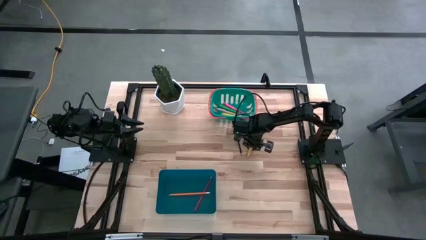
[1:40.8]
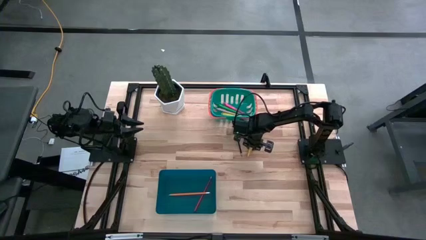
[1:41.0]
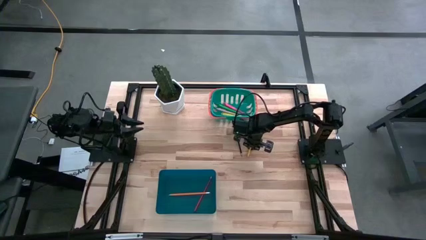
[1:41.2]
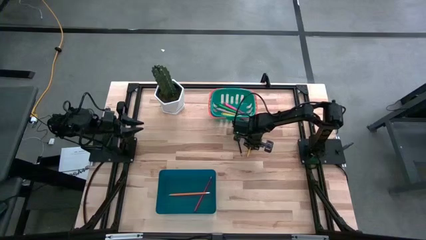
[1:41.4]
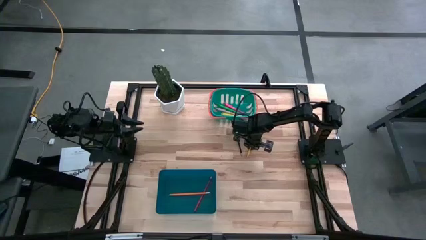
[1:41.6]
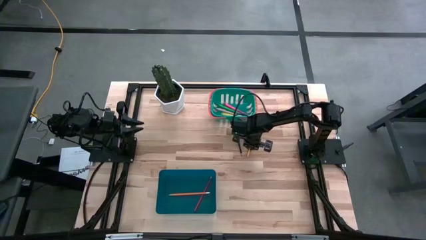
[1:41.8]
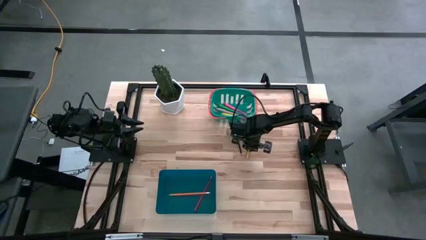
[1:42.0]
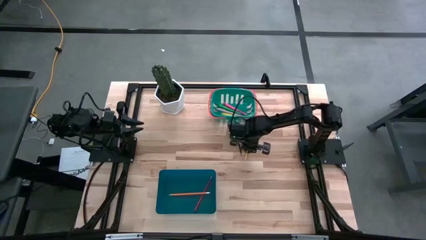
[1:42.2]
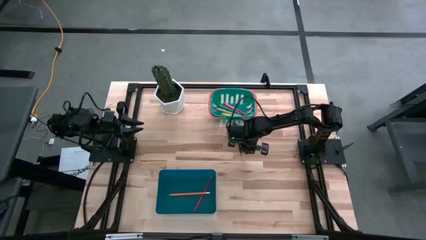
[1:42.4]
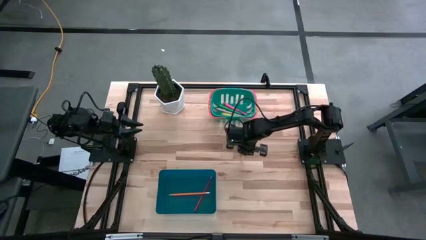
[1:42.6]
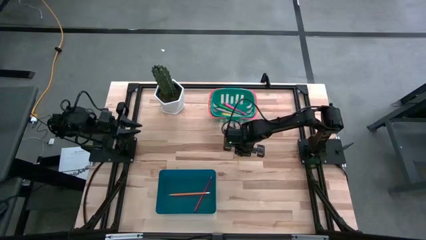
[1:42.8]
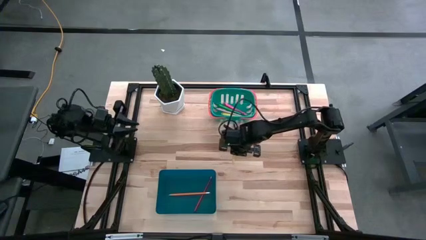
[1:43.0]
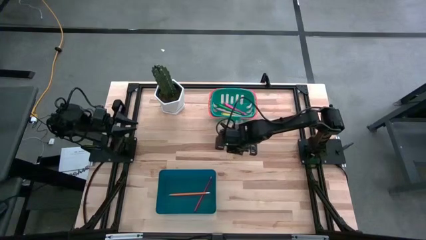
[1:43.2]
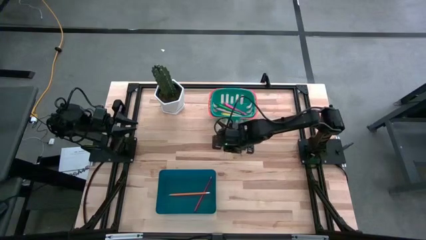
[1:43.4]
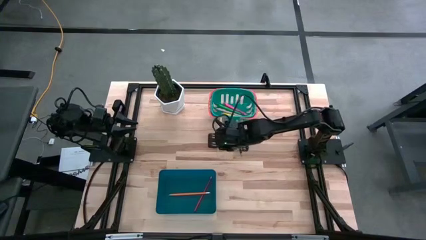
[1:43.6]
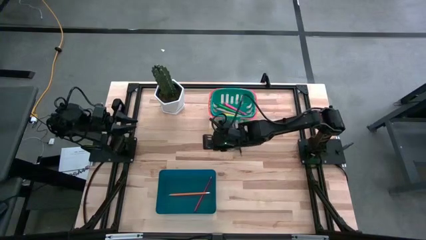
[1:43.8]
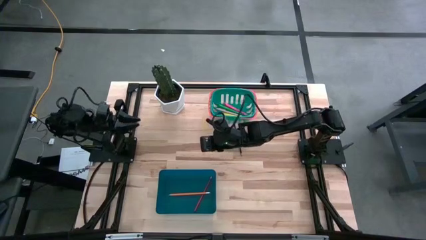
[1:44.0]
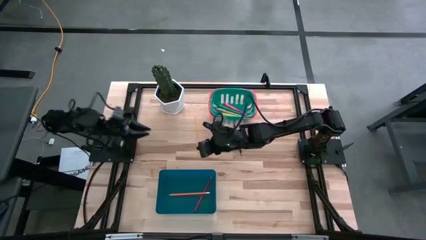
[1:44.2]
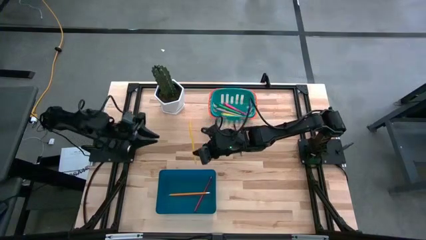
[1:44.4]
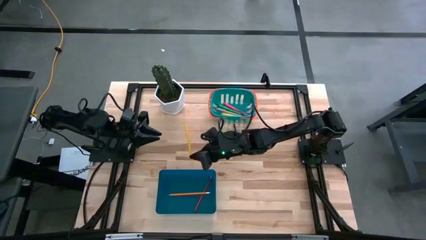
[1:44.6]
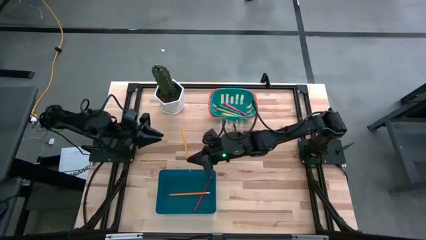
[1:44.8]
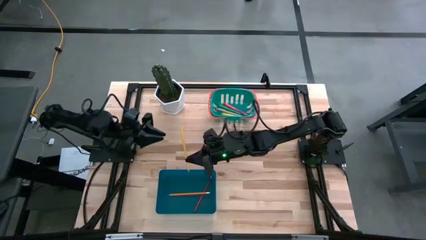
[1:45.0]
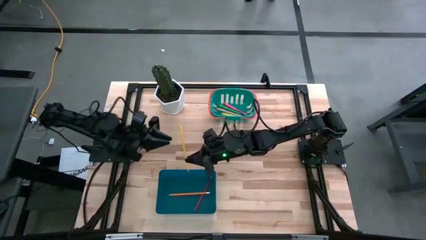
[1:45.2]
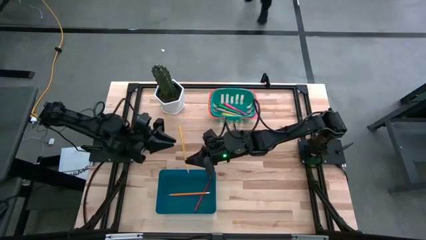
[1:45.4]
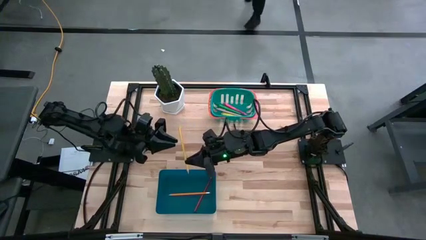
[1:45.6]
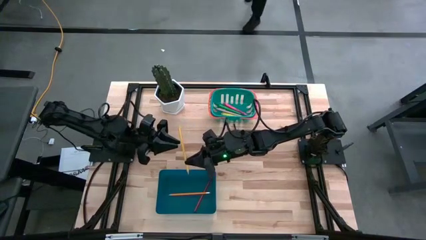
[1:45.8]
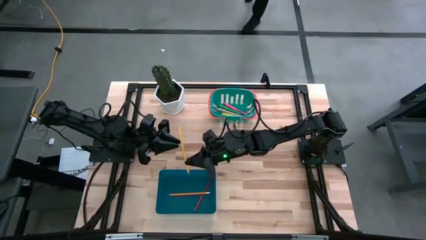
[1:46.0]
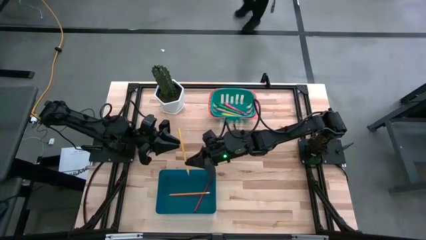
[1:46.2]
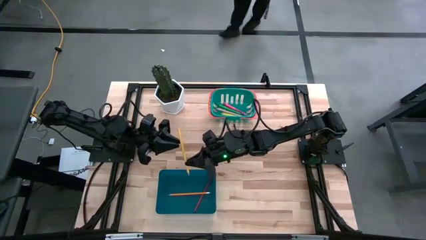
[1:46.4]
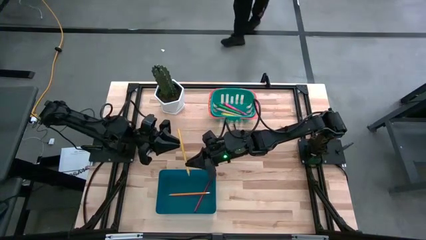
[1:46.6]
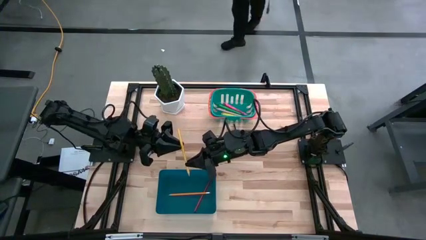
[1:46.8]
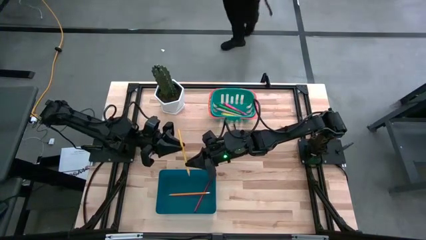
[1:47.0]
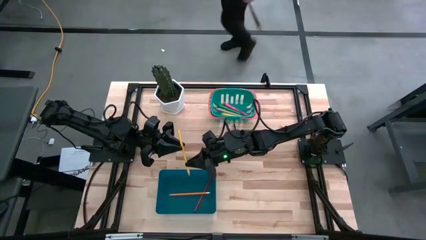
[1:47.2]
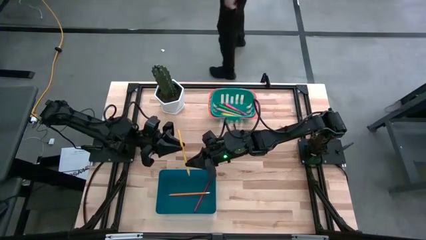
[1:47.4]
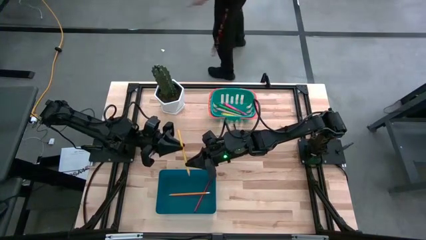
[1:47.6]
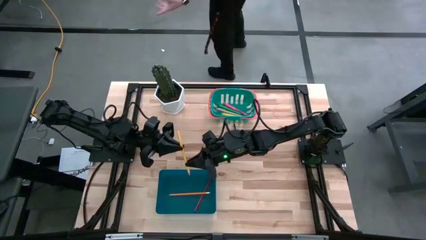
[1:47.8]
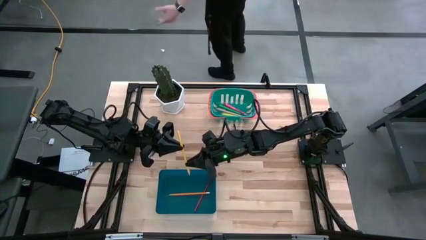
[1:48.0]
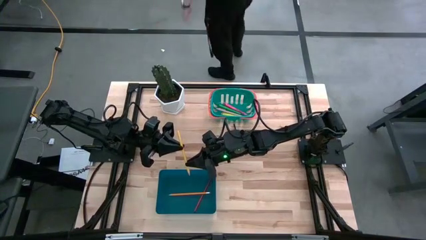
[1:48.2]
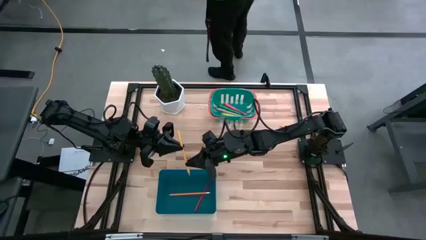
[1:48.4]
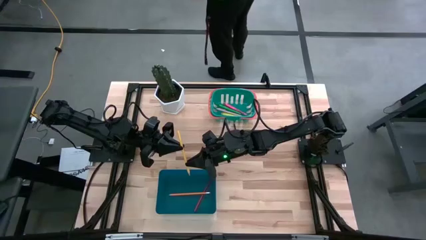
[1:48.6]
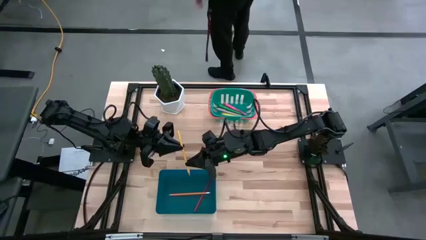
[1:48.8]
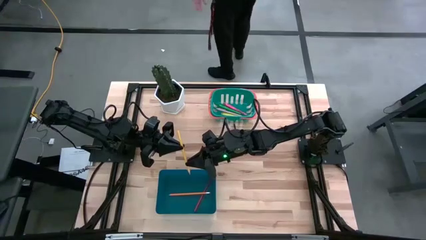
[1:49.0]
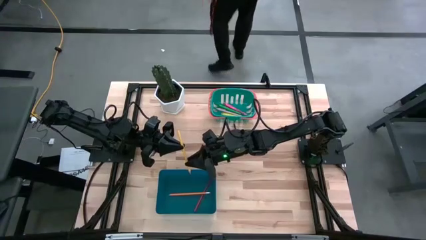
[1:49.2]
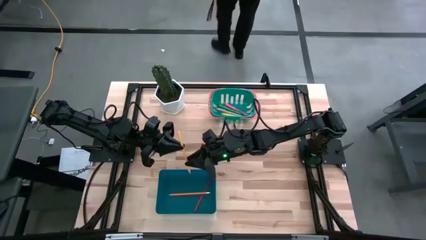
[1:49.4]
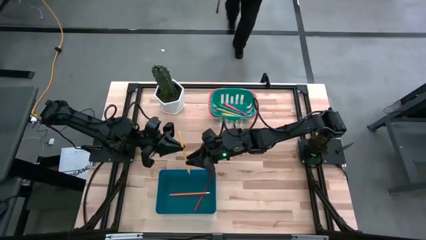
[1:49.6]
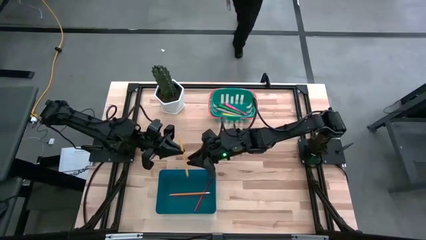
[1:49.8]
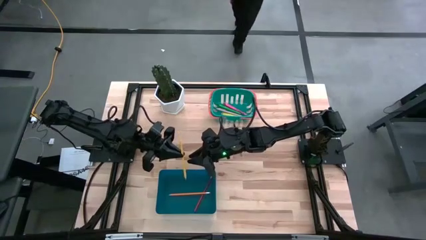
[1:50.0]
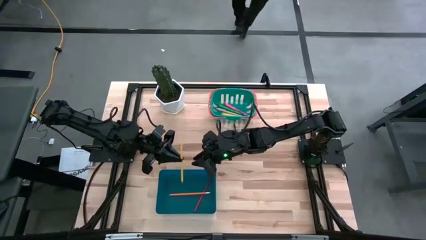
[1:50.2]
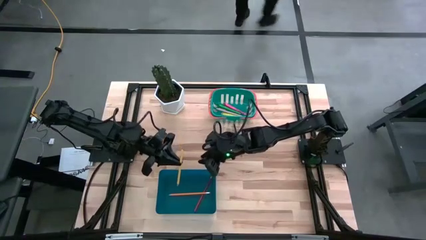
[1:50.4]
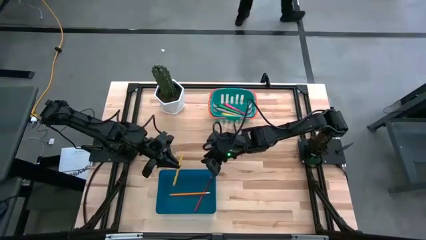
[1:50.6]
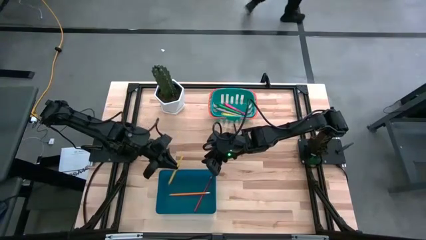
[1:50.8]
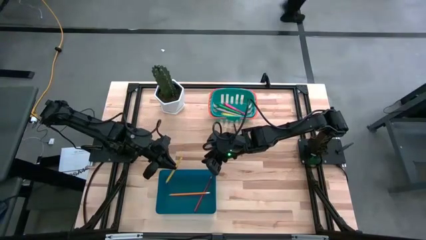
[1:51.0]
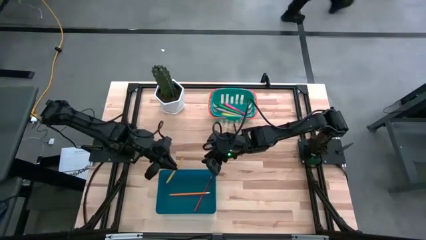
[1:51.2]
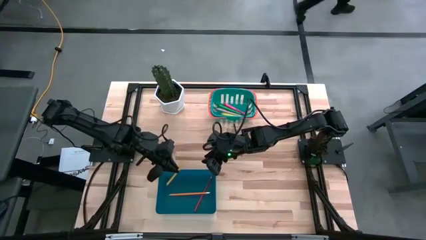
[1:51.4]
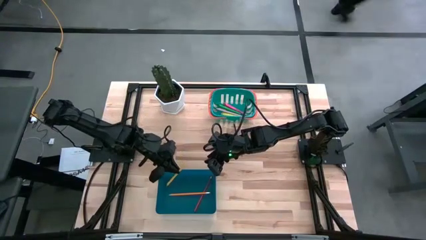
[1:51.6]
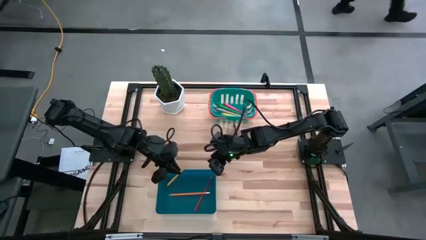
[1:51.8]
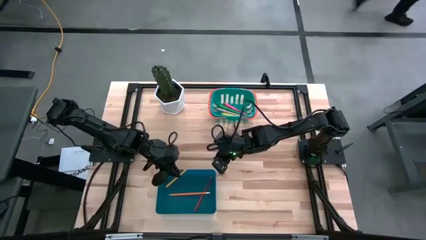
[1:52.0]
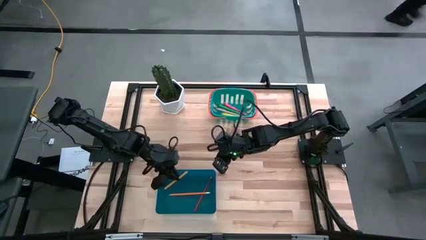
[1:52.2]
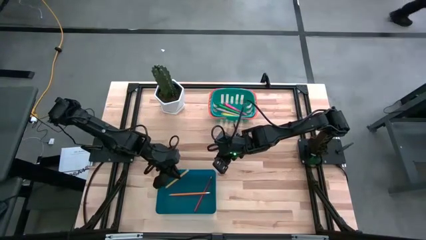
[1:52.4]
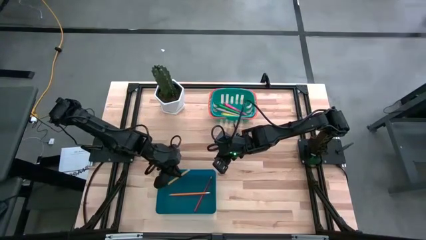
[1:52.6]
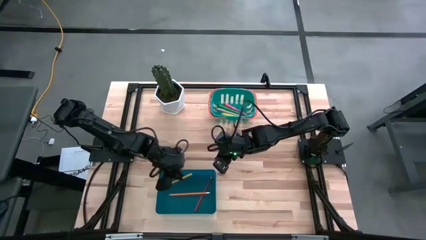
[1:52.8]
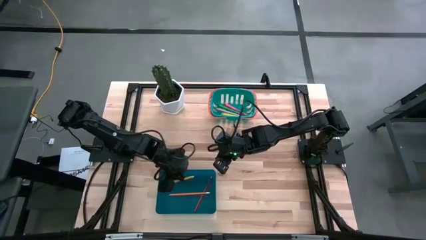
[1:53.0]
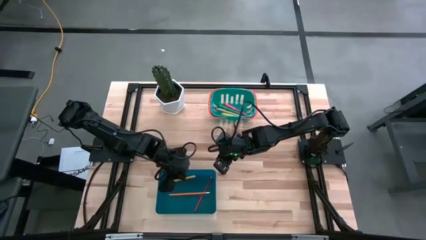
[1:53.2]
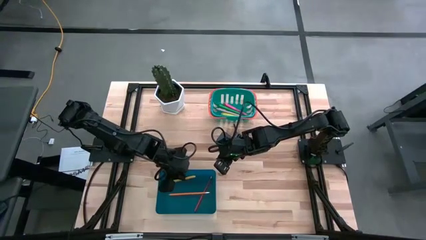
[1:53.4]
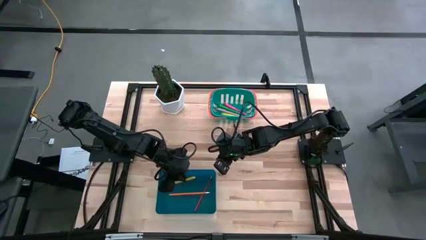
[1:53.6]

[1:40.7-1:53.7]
Task: Sort pens & pencils
Put the yellow pencil into the blue bin

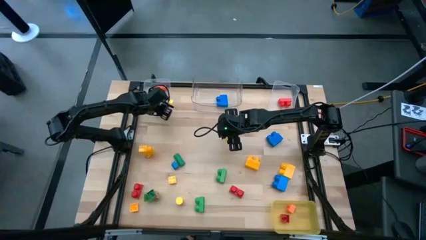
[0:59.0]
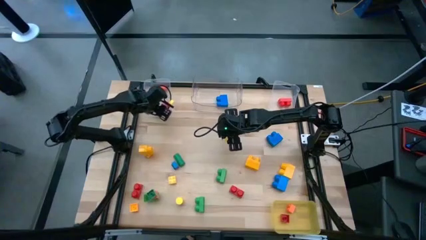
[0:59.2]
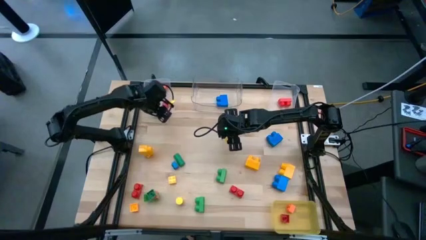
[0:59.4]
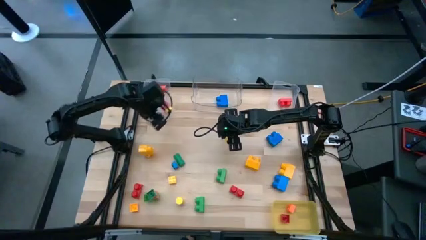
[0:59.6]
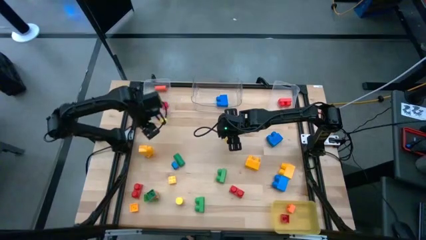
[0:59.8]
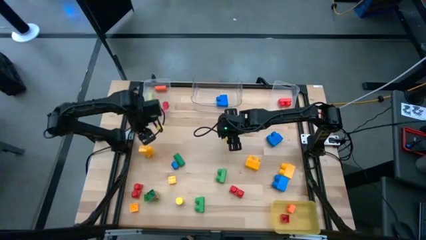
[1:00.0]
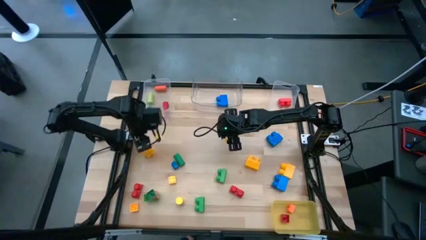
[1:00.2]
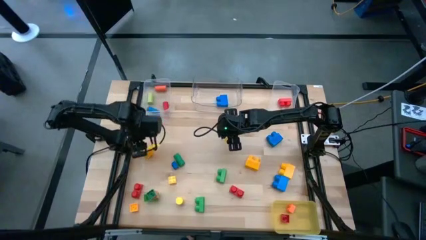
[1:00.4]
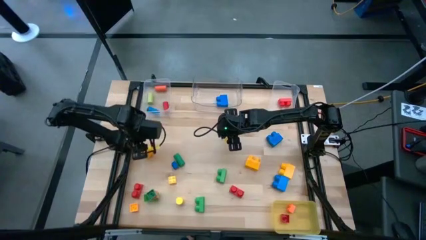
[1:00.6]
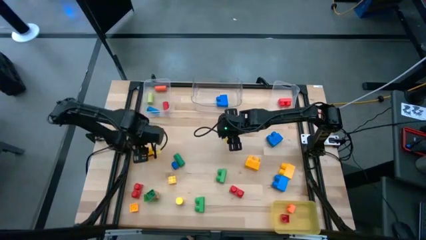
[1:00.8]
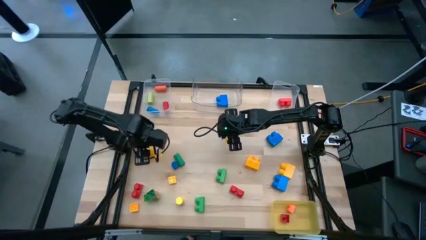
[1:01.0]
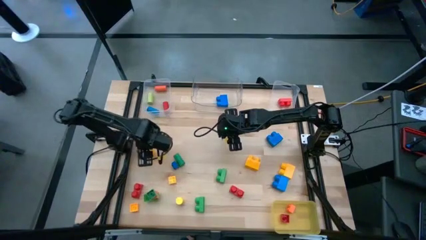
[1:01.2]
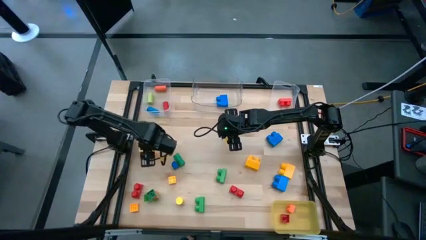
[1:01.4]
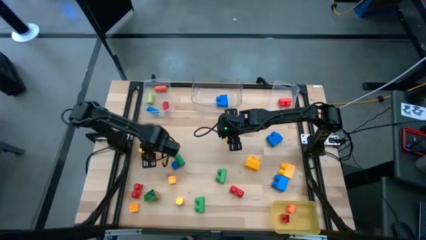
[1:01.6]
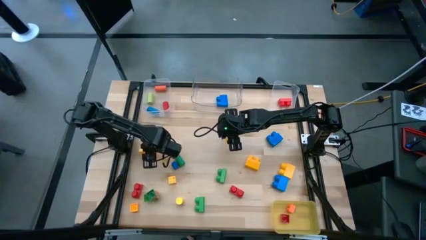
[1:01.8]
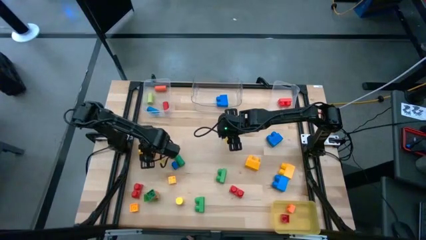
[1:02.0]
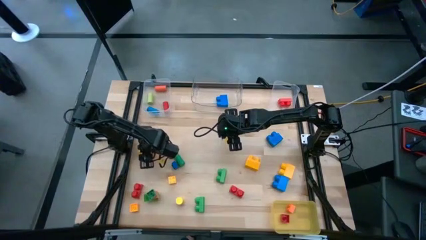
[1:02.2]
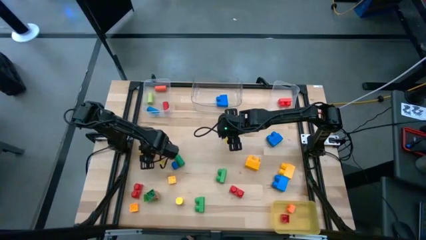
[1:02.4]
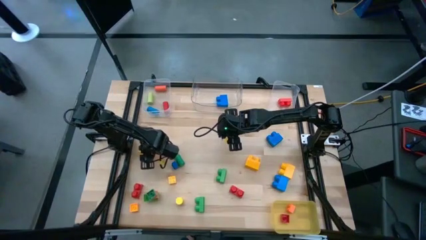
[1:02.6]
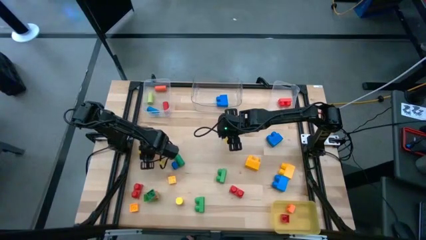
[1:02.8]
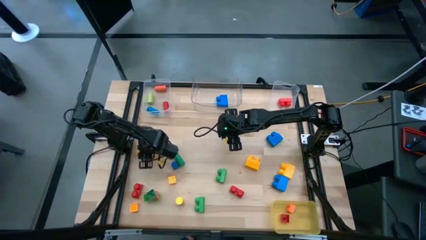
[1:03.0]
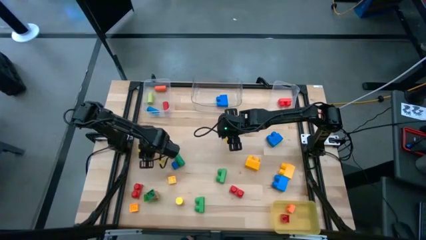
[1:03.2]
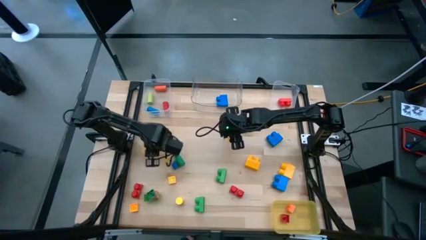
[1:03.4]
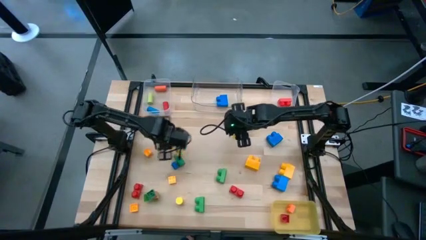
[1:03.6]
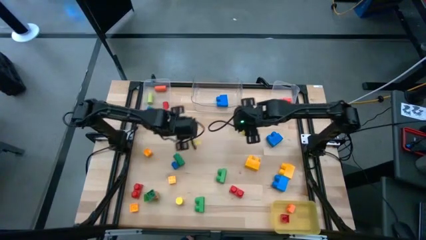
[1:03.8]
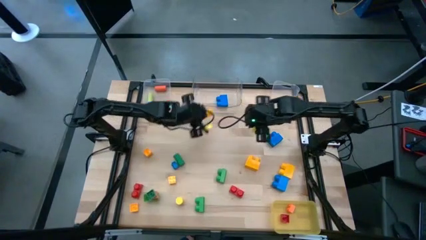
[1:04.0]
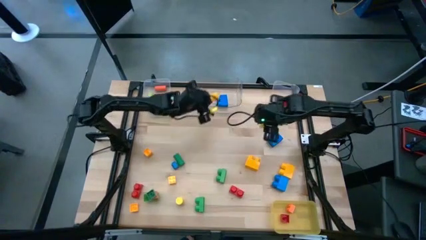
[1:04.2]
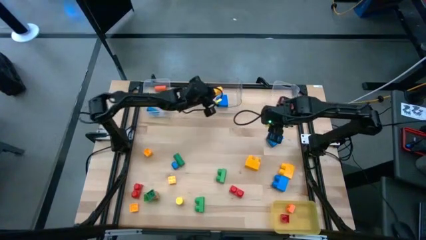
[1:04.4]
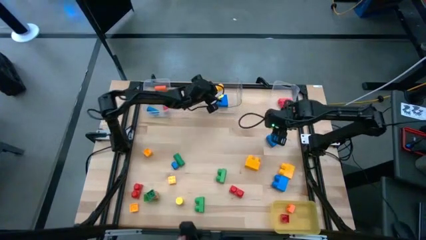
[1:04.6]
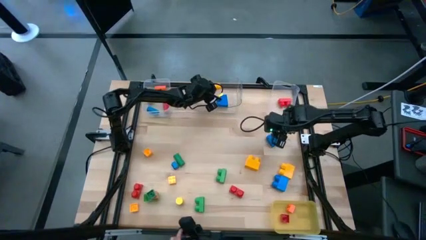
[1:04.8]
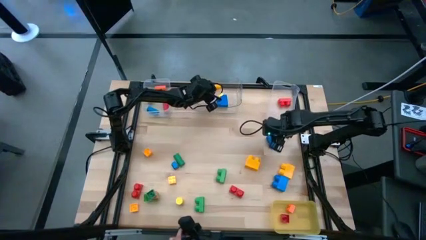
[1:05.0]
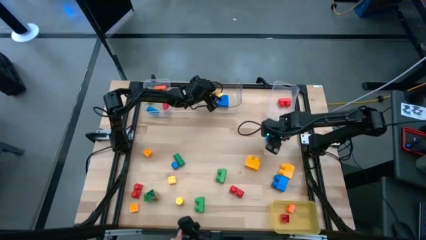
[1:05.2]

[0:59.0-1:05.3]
Task: Sort blocks by size
Put the large yellow game piece in the middle transparent bin
